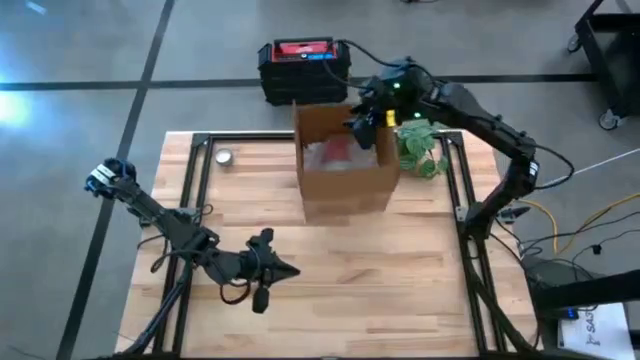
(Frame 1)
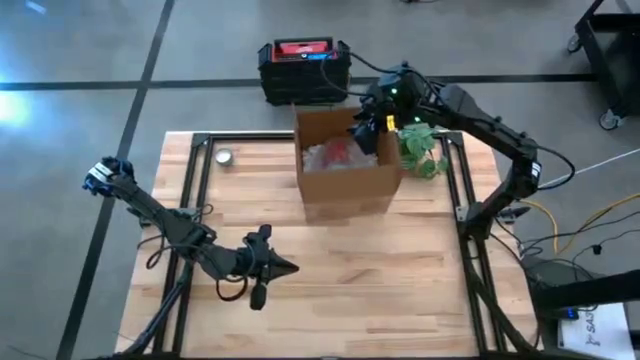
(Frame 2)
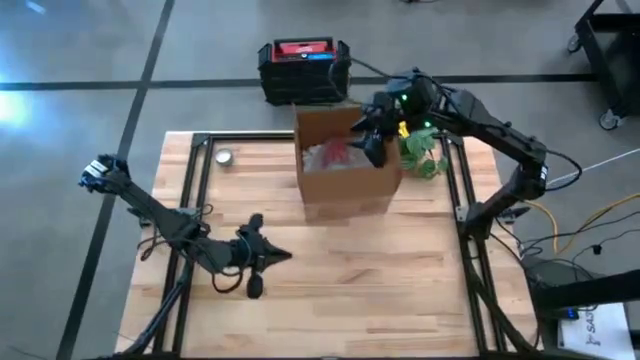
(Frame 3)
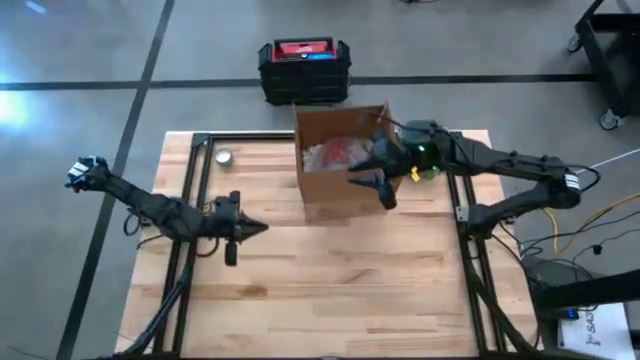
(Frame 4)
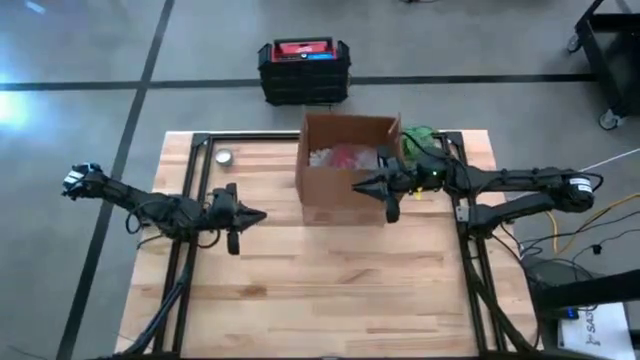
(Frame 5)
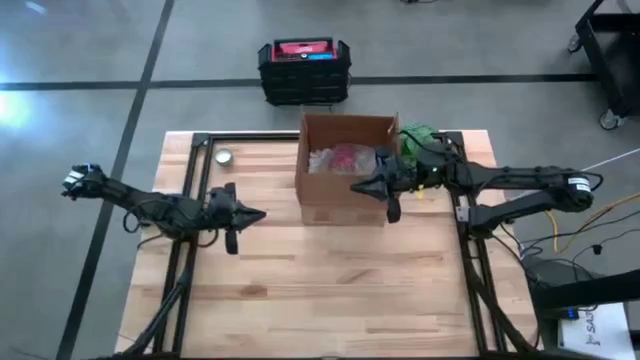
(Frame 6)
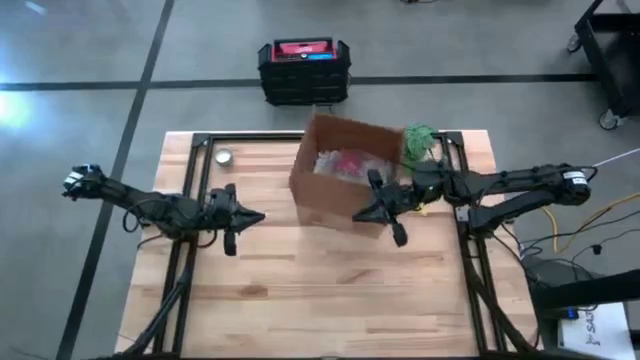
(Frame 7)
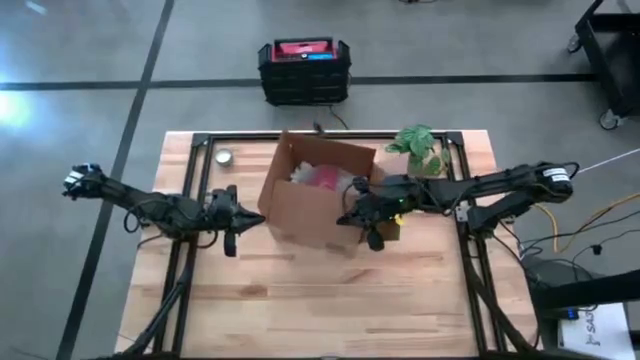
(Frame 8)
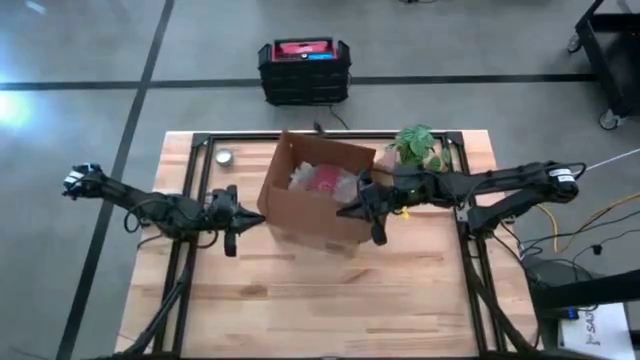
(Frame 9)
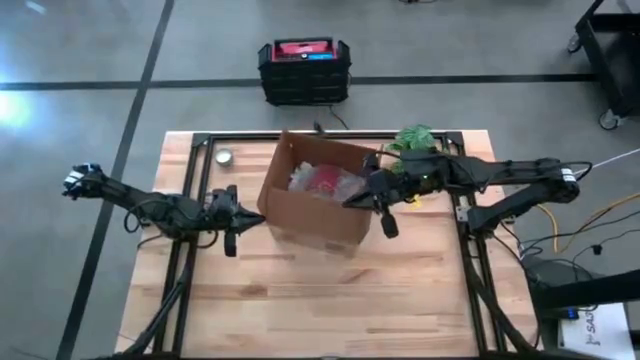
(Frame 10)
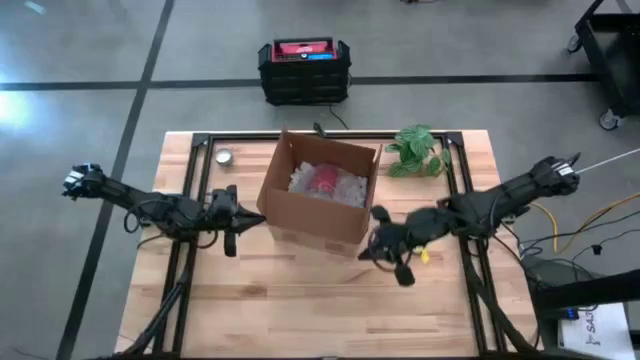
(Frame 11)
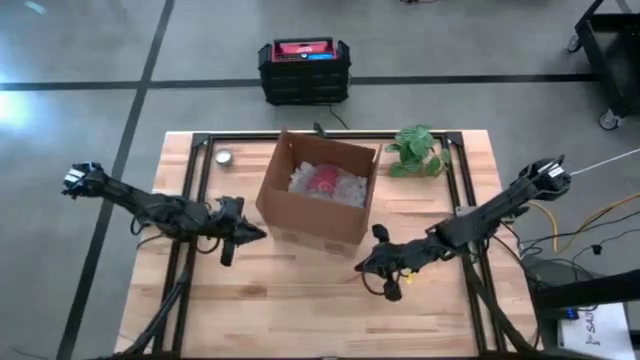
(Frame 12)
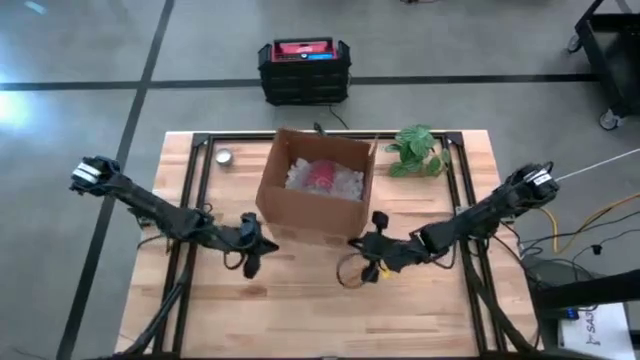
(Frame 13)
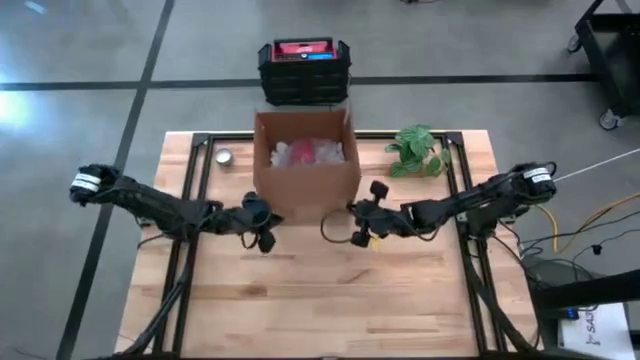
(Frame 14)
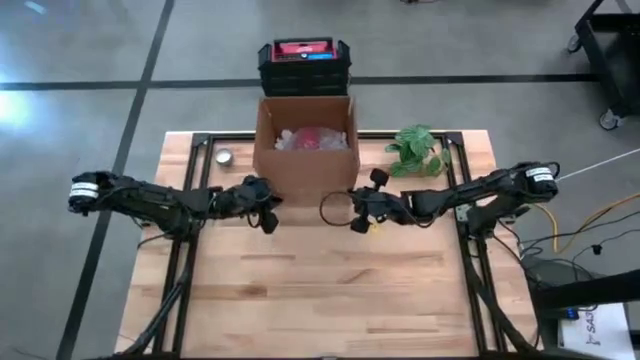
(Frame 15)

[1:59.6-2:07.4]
Task: wrap mug
Adjust the brown cardboard box

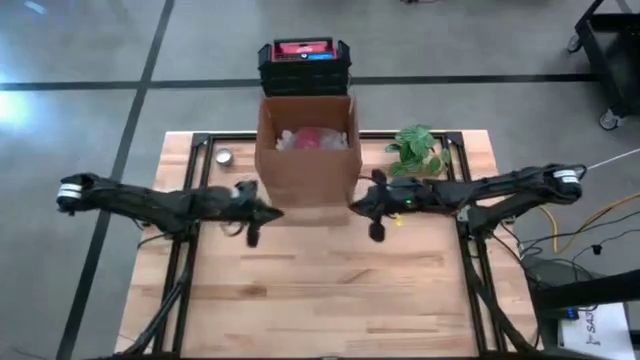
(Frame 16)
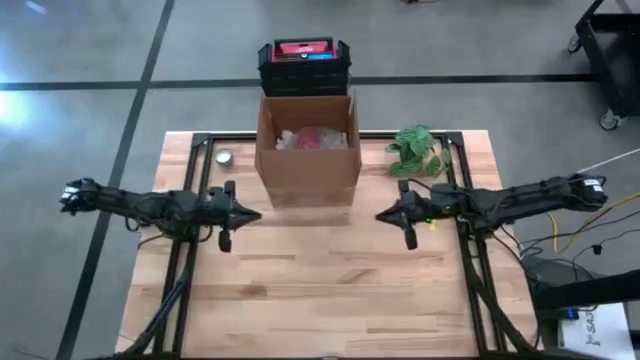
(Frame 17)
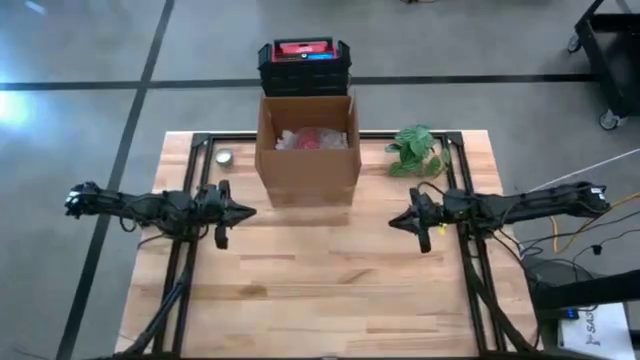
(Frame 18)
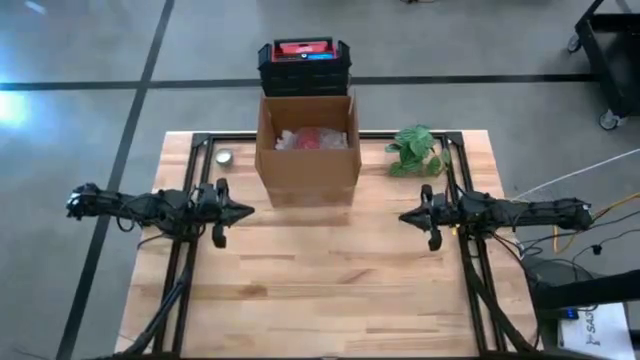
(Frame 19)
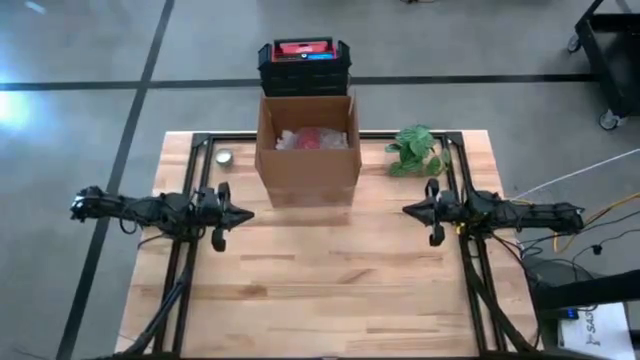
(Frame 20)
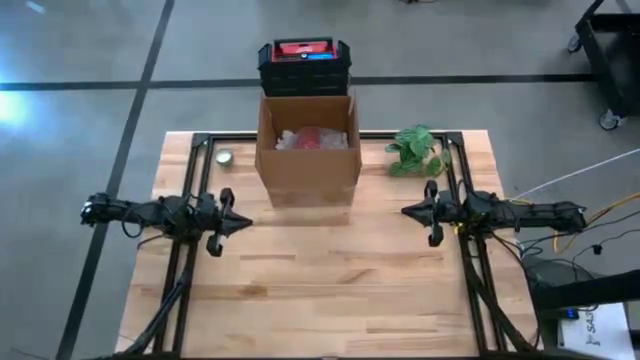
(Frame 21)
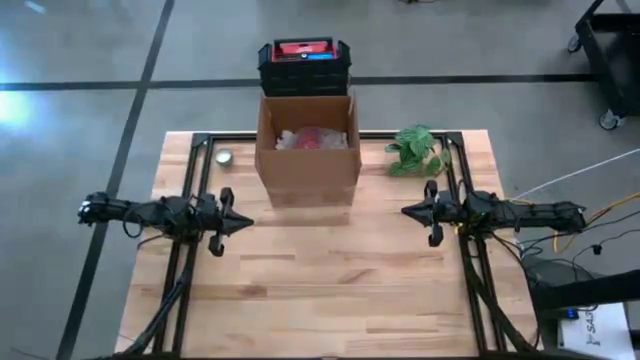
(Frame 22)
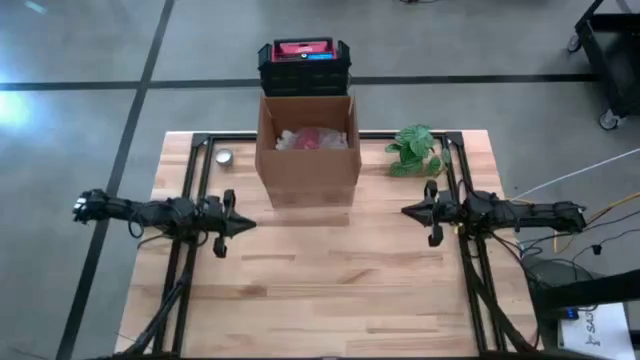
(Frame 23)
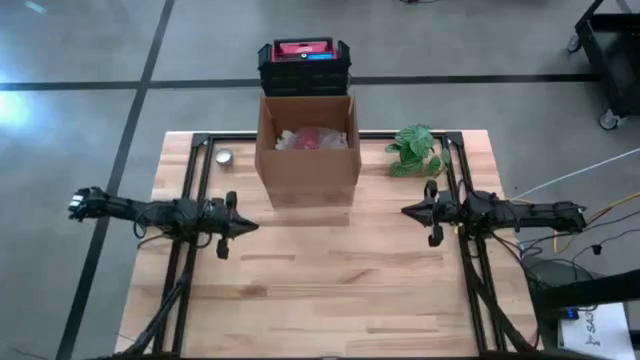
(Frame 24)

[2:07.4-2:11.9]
Return to Home Position

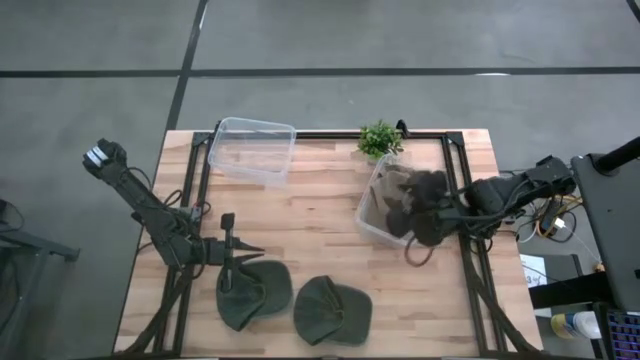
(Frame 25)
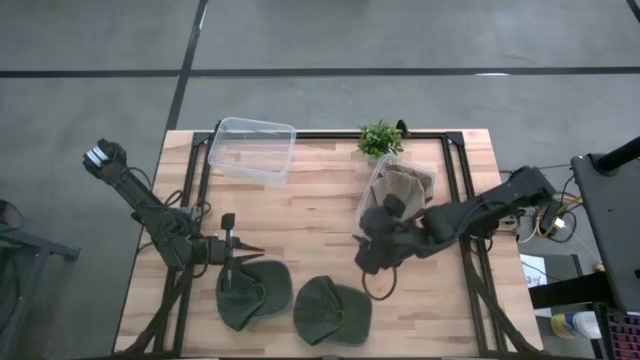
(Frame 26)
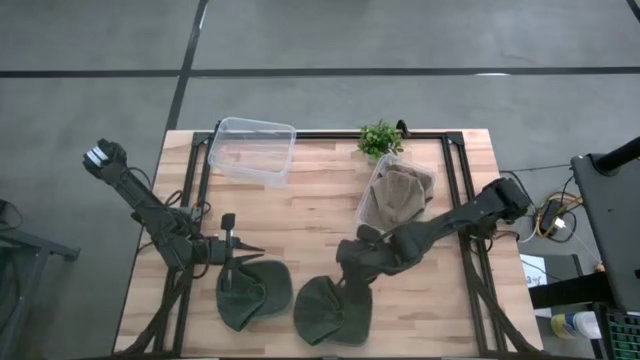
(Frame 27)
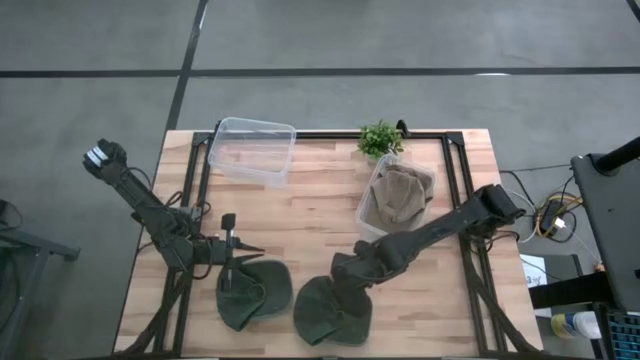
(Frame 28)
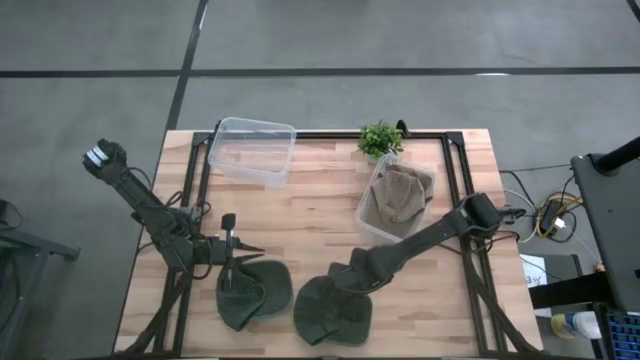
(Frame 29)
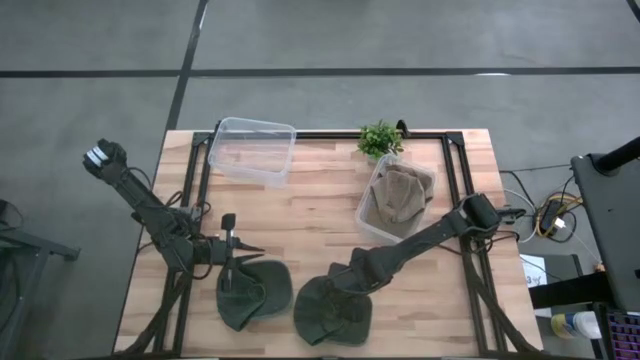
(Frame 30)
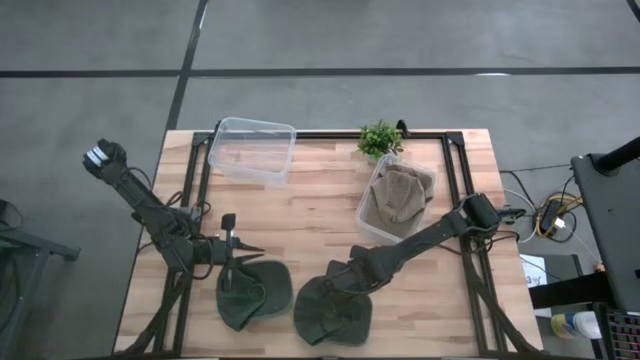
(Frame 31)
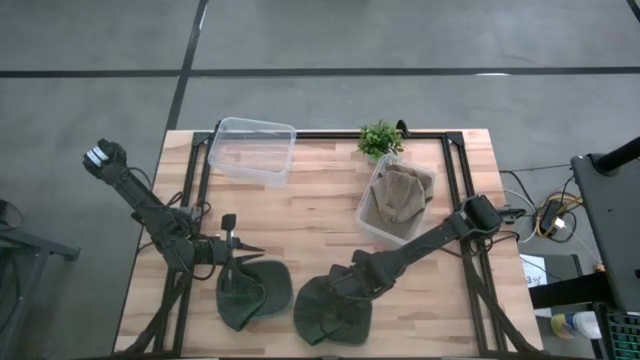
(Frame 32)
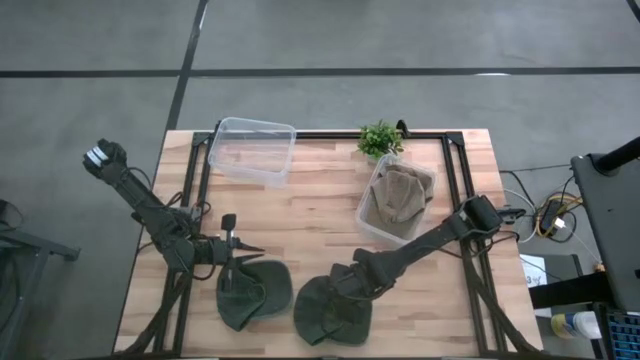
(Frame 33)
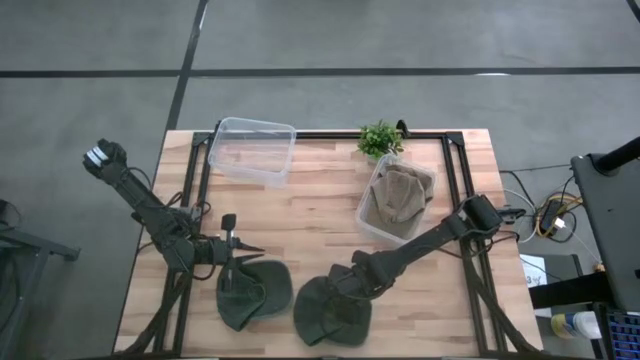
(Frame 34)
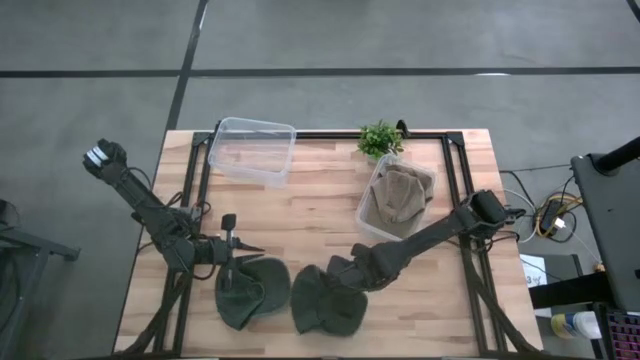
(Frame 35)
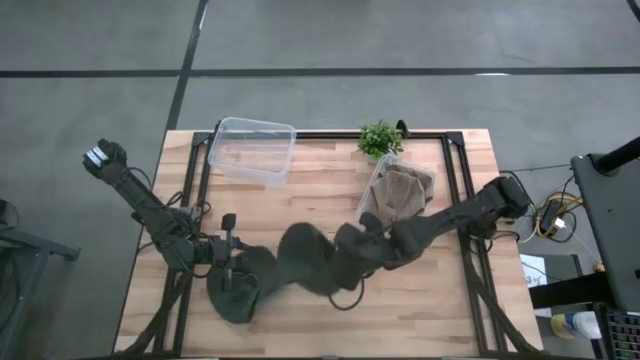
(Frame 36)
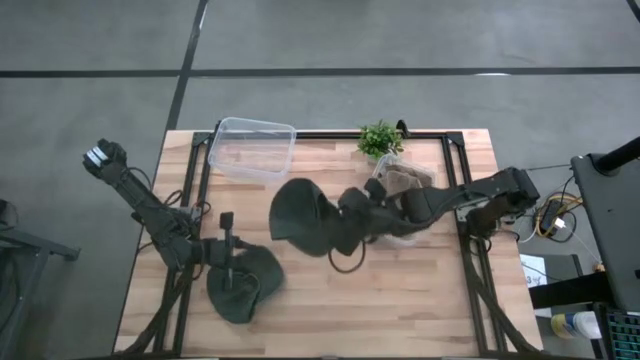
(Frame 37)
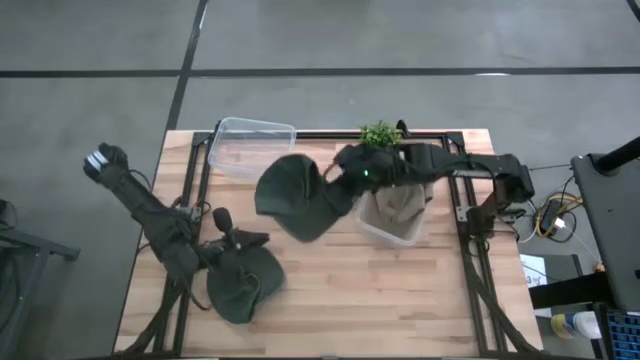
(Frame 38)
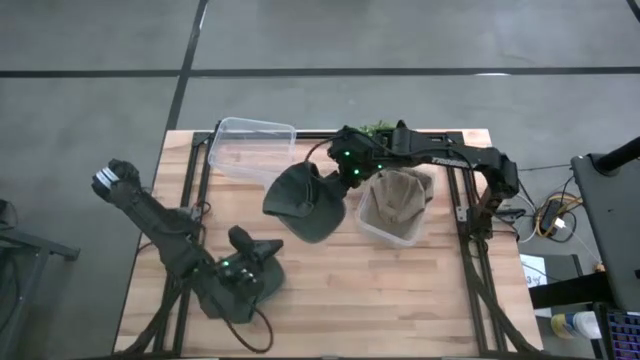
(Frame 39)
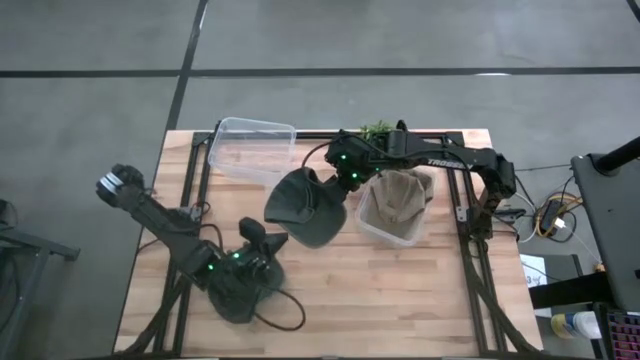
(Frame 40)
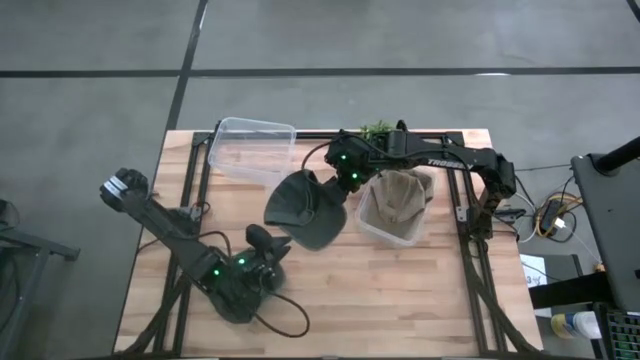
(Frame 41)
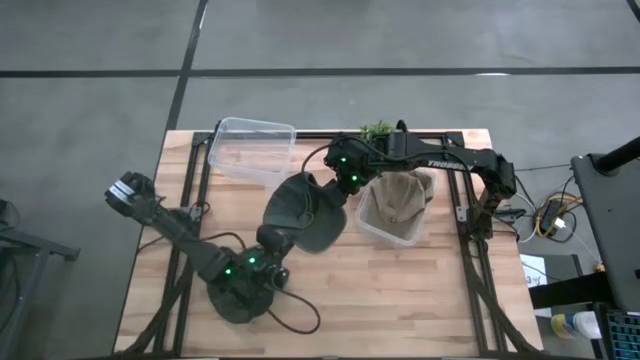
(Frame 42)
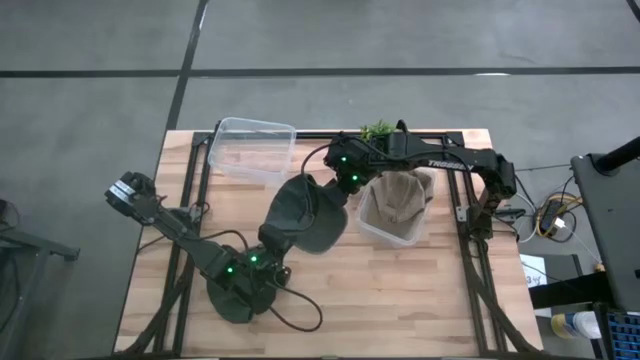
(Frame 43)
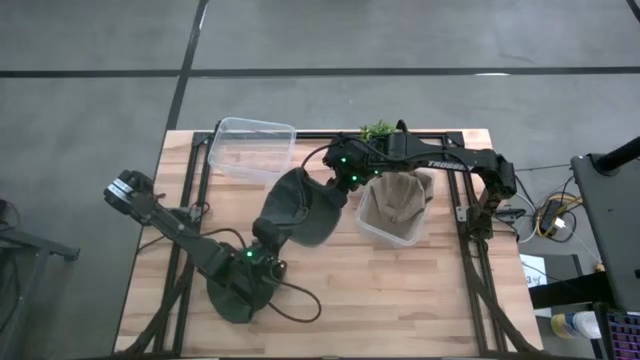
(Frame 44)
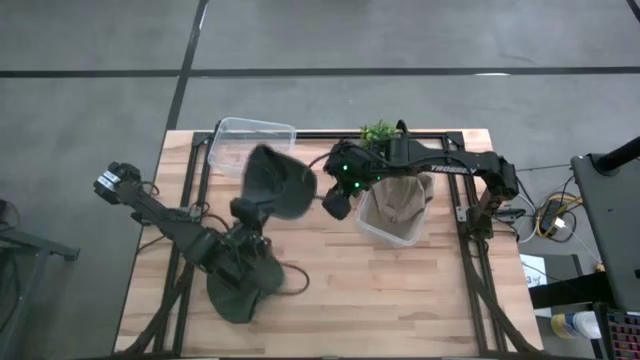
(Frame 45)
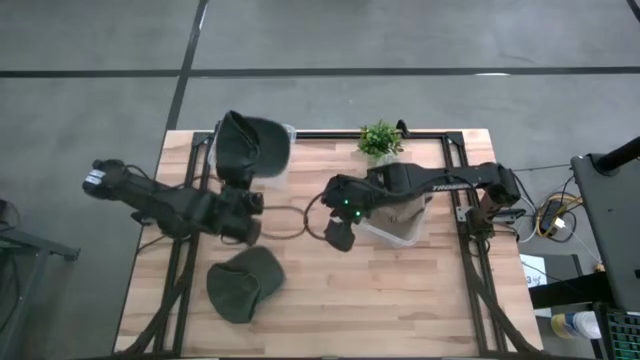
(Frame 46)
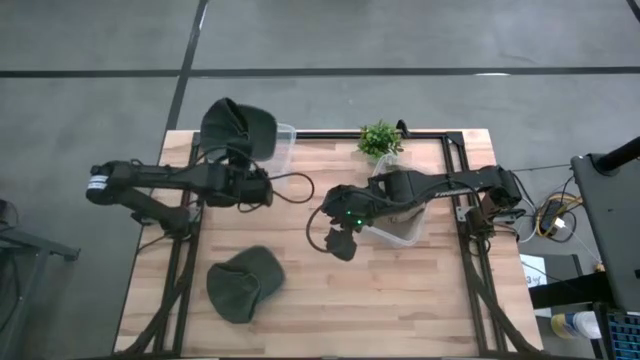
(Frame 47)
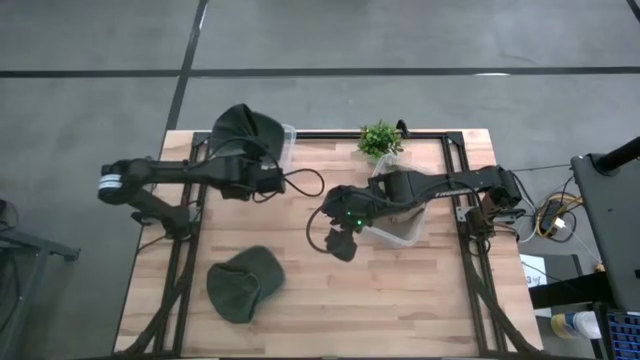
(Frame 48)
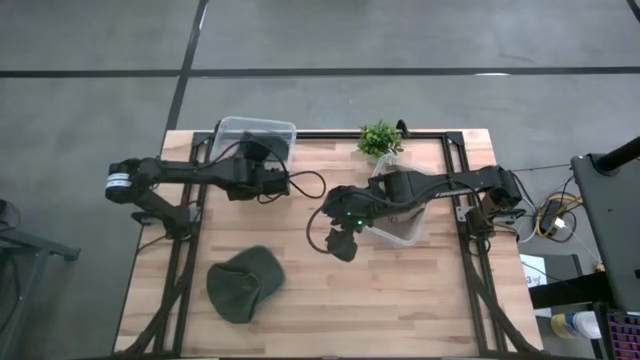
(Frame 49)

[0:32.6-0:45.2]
Task: Pick & Place hat
Put the right blue cap into the left transparent bin
